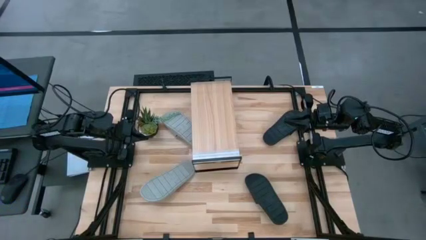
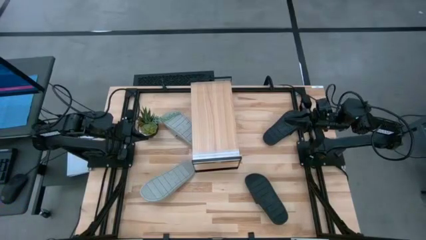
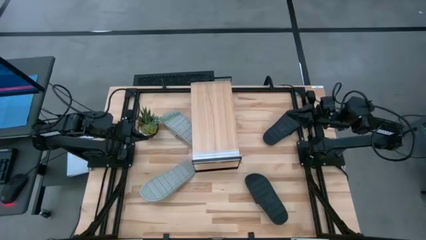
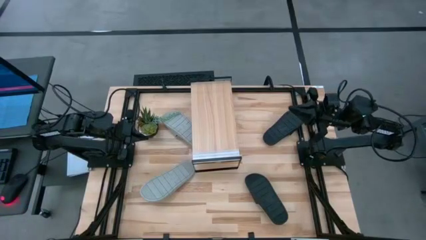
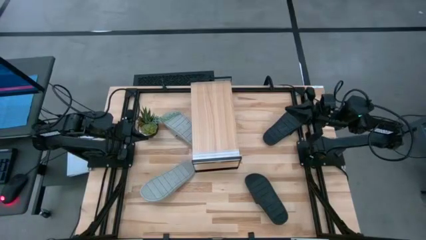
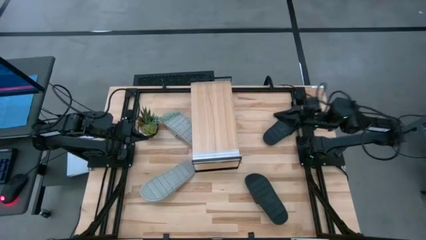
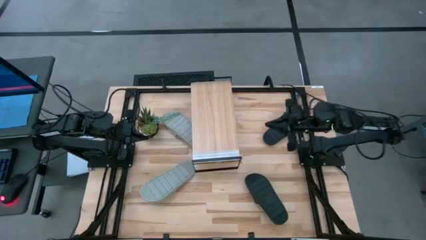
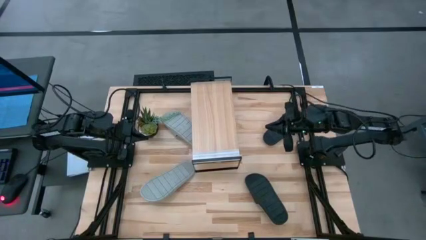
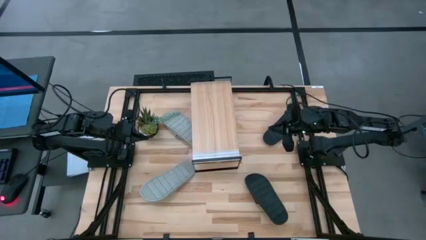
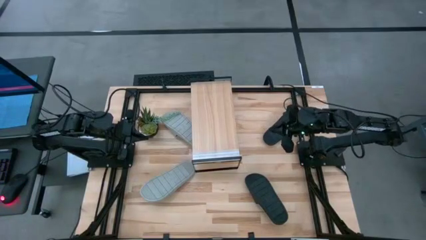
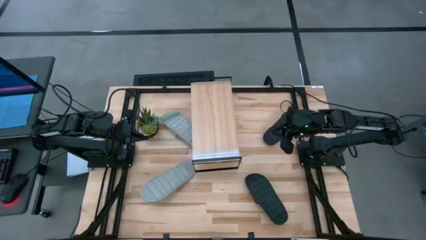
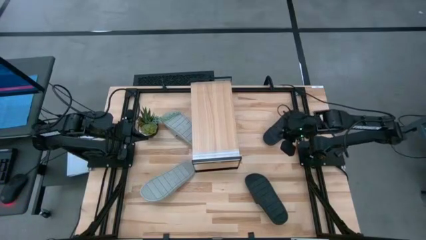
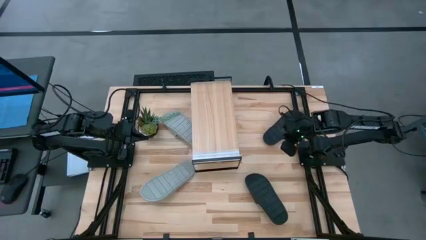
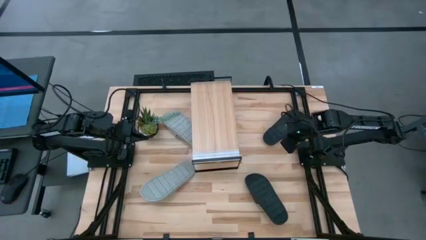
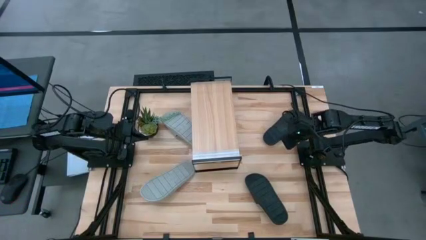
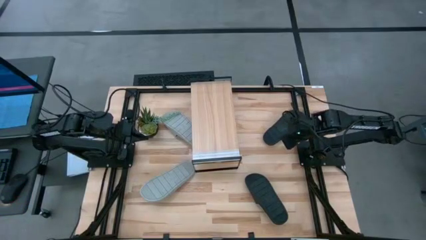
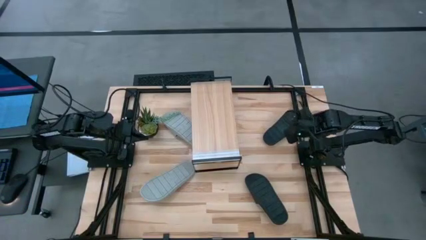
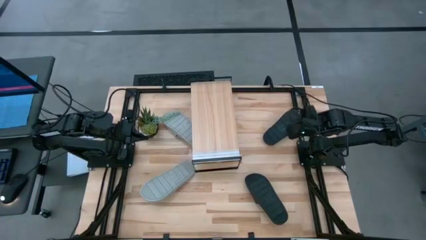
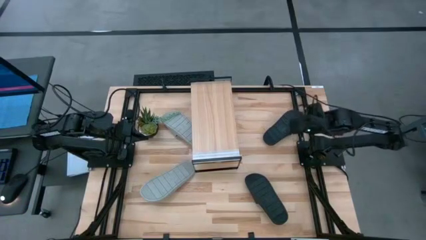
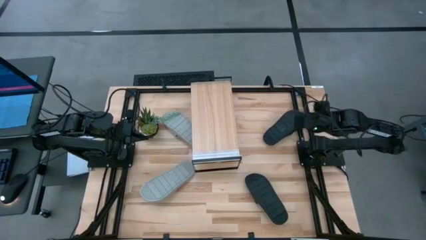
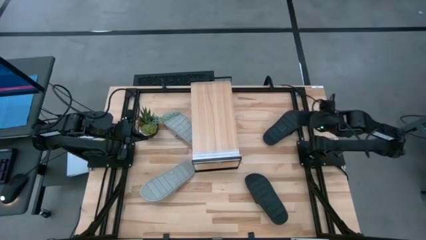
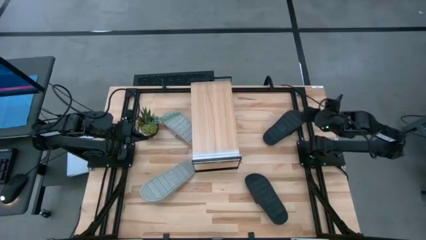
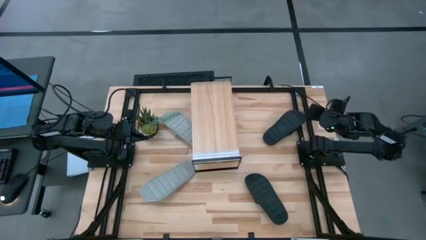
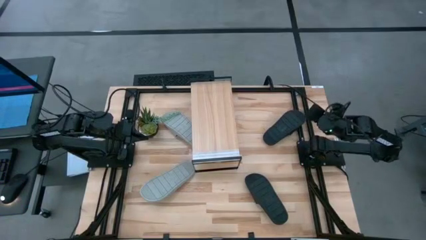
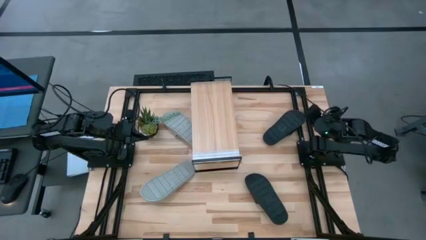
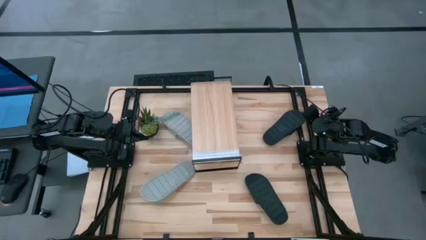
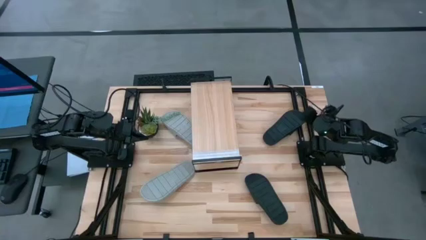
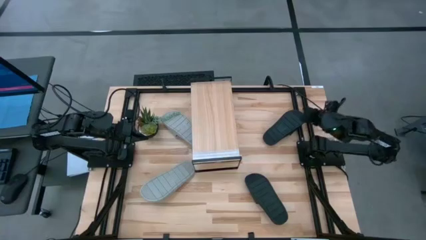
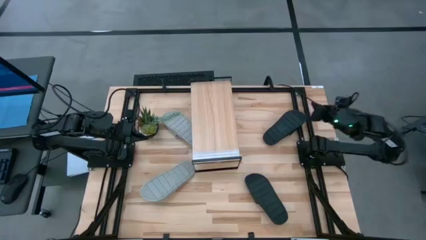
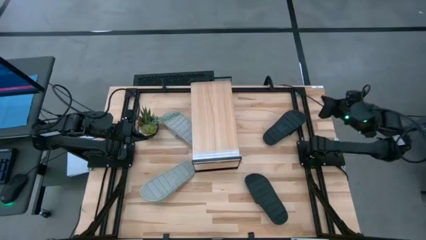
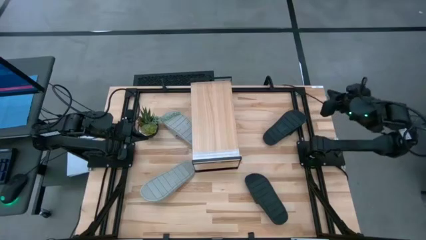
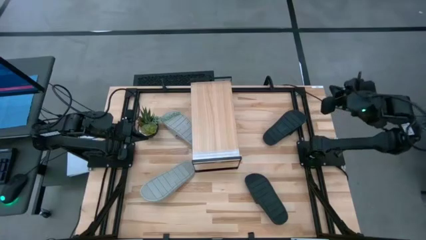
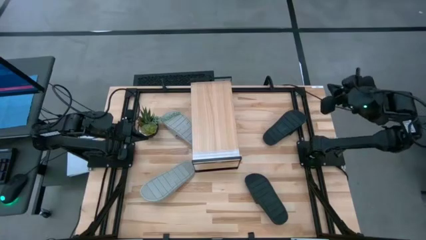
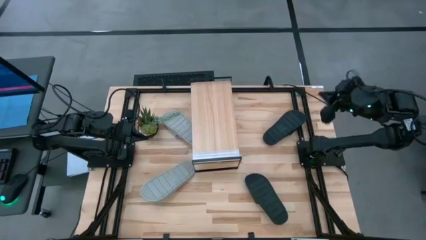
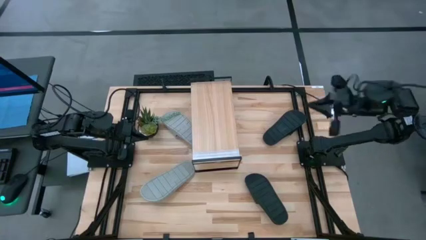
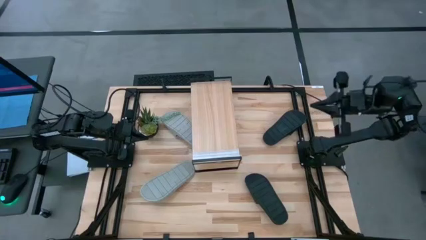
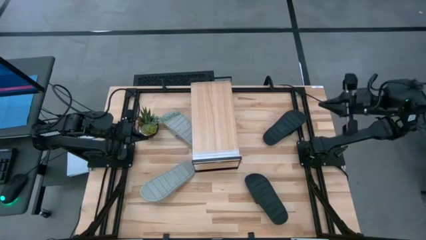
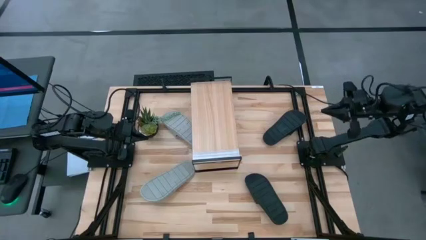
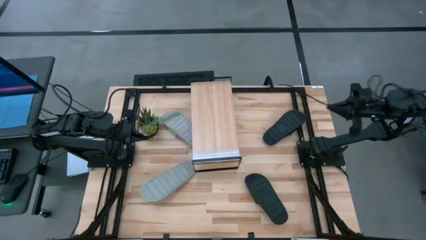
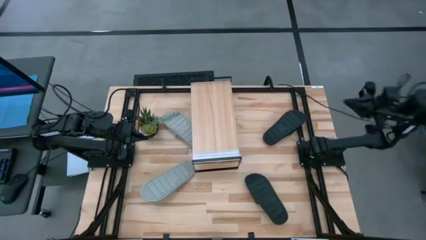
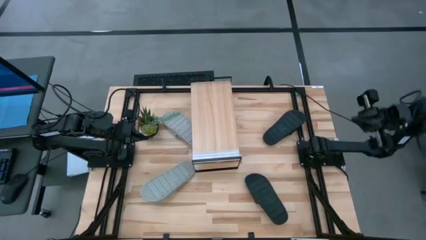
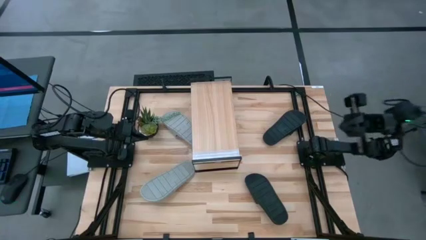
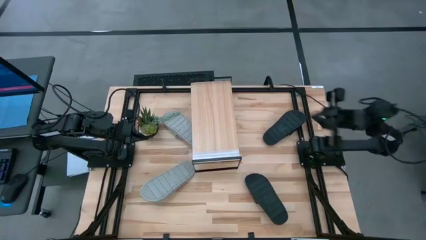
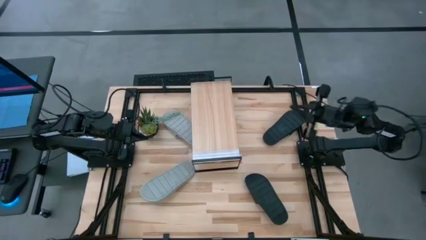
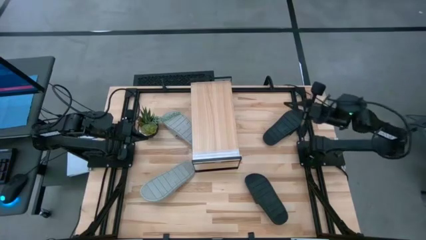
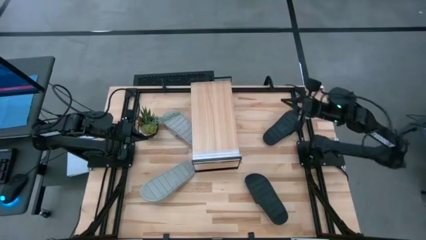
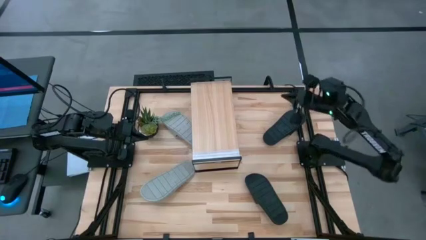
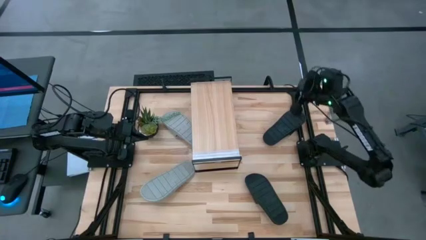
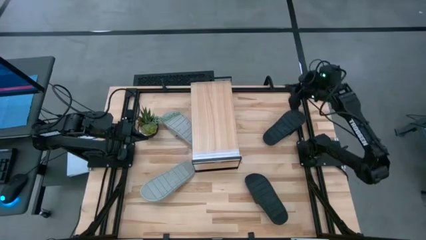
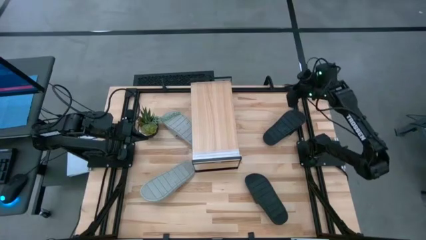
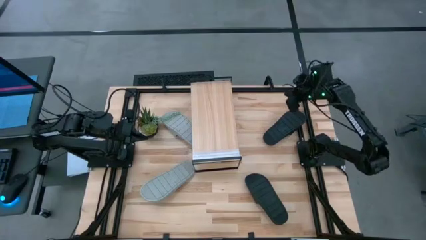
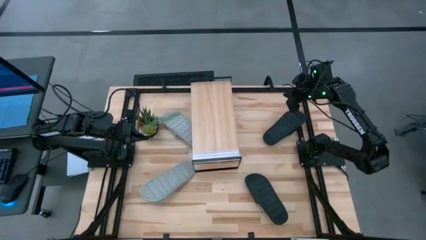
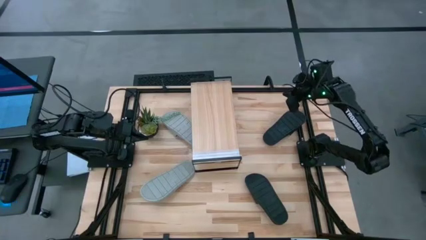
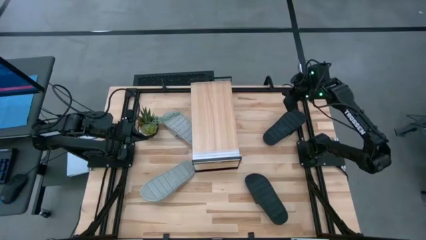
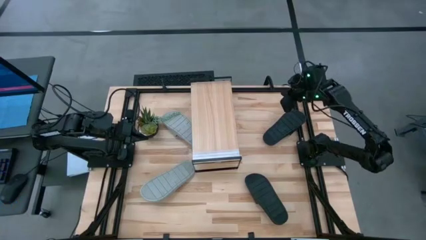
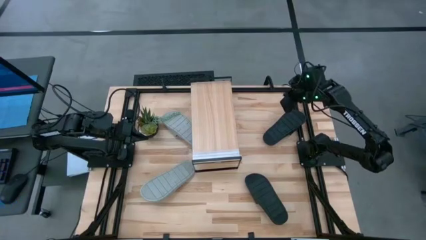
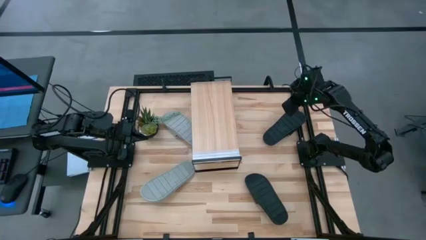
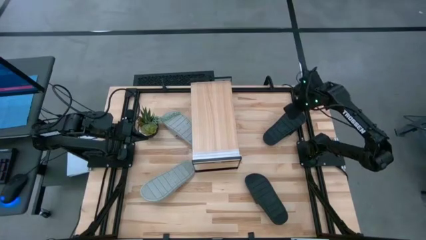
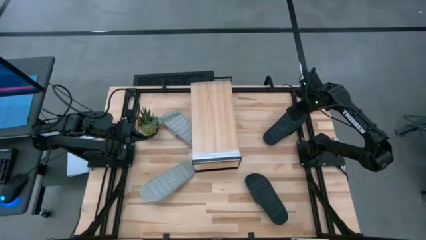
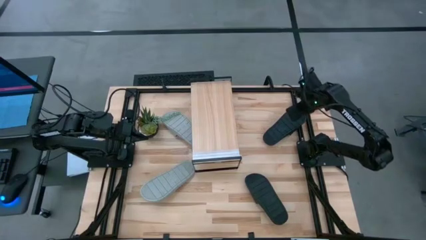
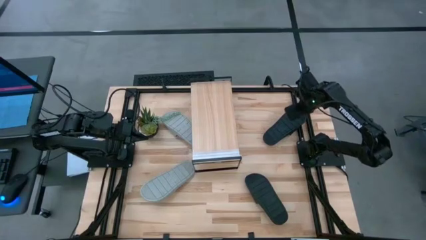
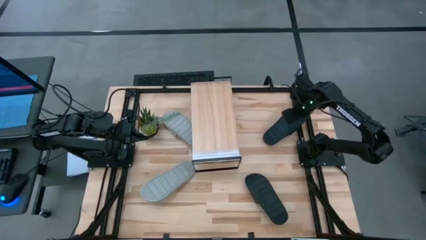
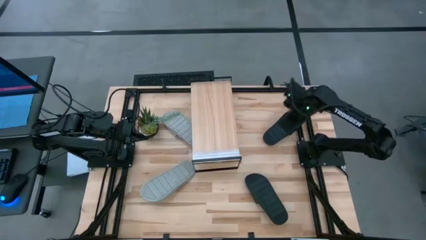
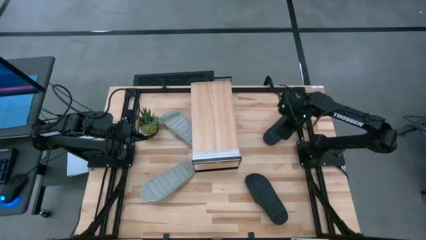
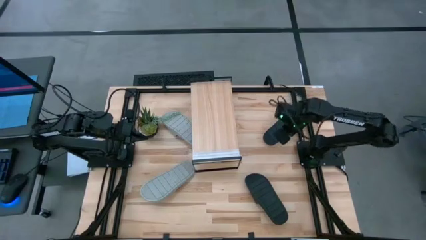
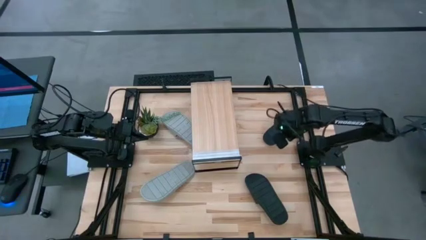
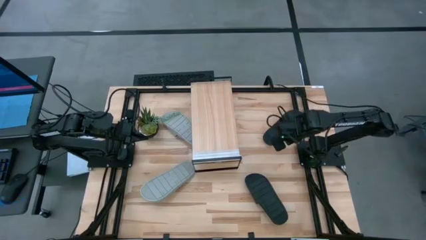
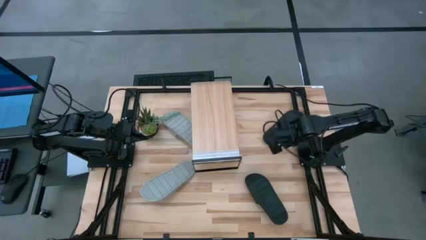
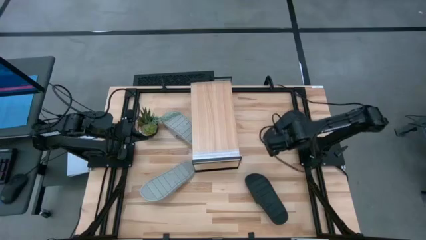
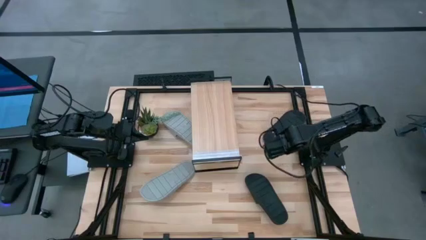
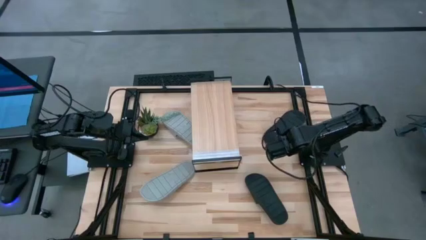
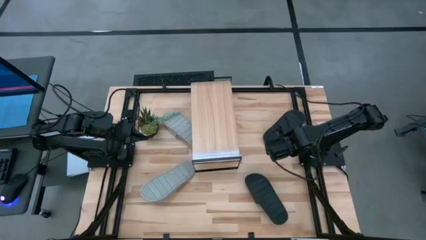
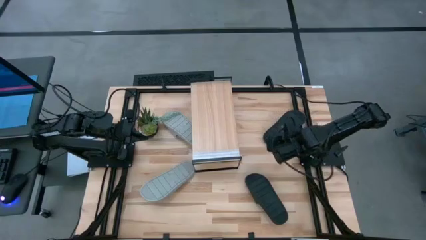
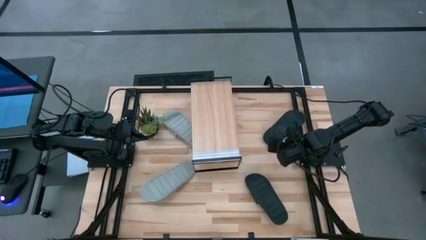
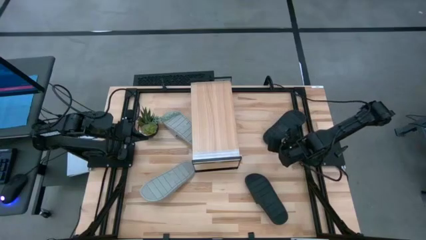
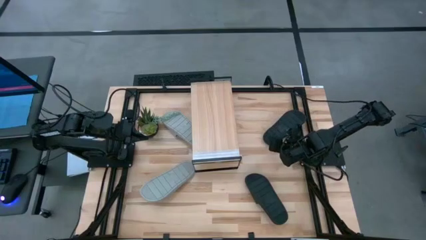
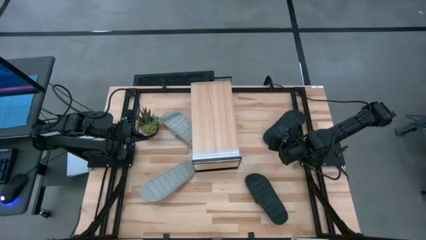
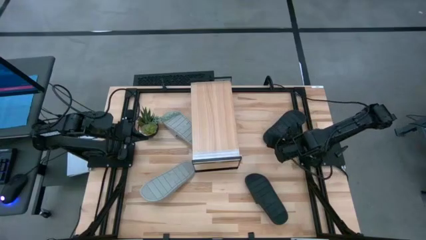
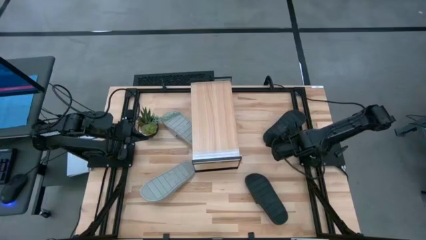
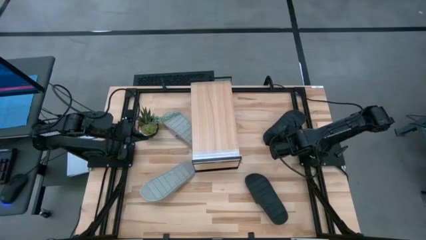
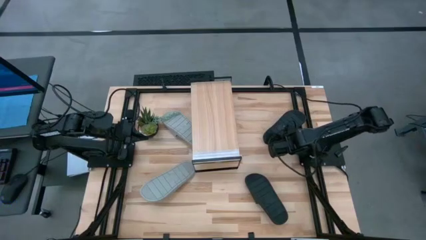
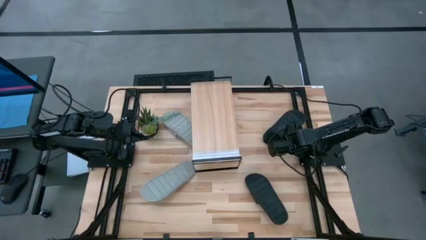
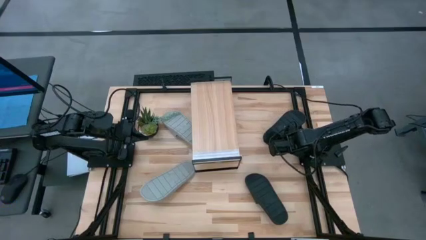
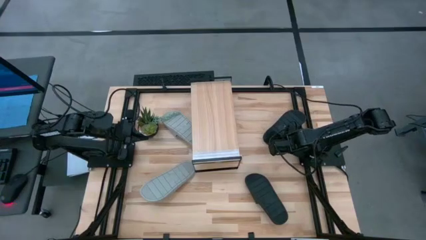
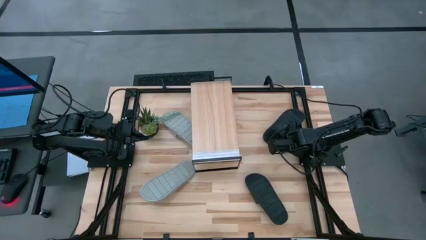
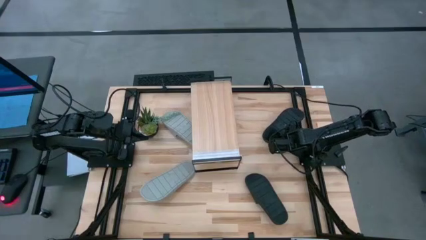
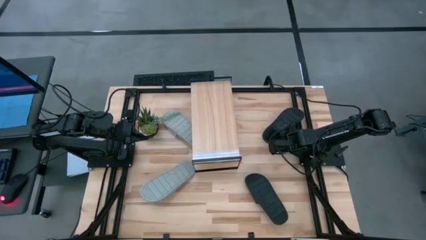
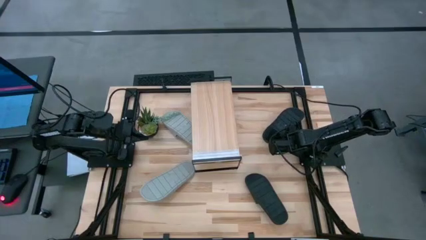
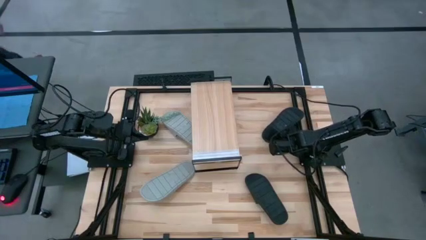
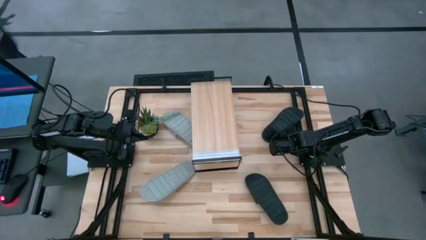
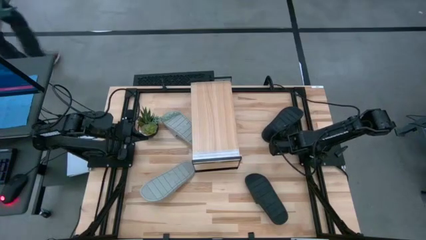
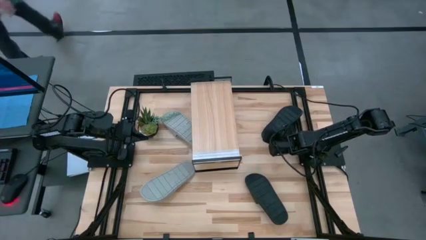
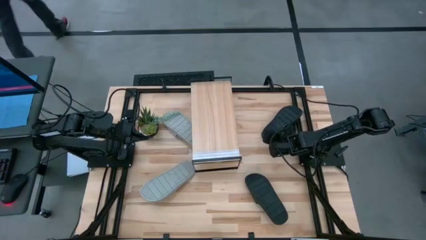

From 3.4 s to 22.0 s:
Task: Pick and place slides into the shelf
Put the top black slide on the shelf
